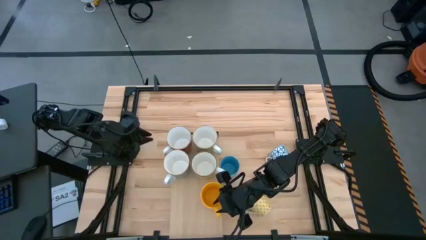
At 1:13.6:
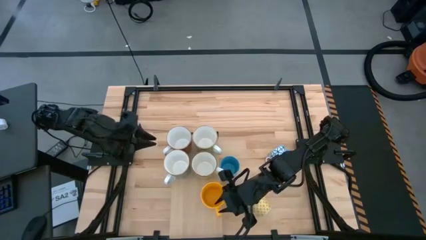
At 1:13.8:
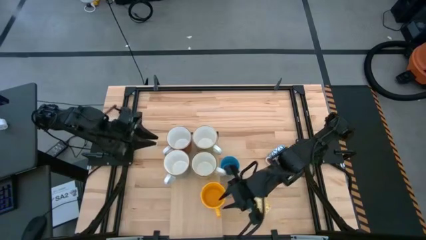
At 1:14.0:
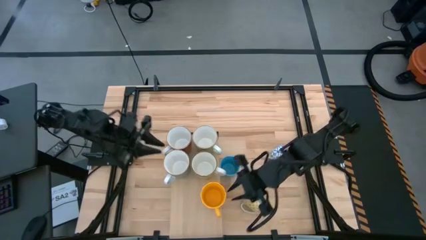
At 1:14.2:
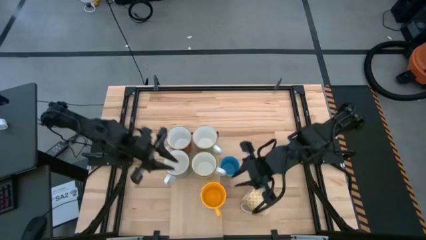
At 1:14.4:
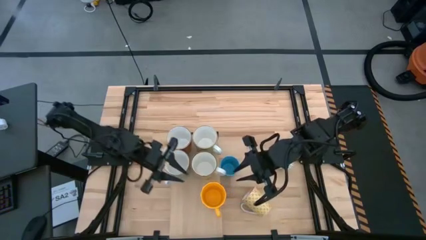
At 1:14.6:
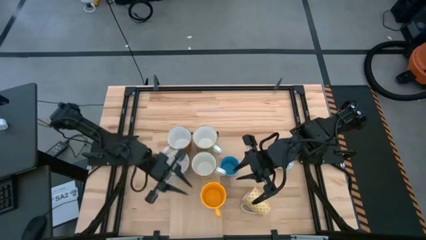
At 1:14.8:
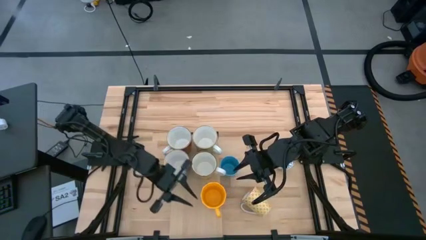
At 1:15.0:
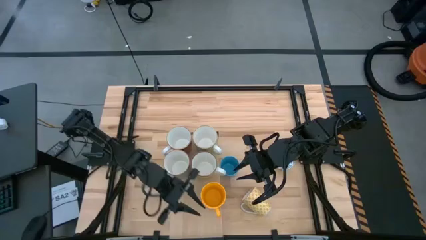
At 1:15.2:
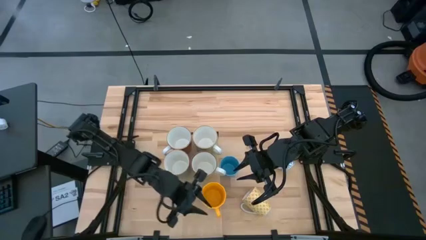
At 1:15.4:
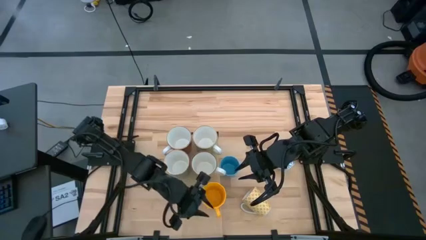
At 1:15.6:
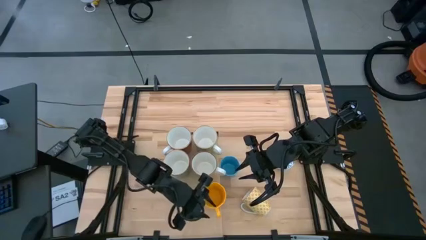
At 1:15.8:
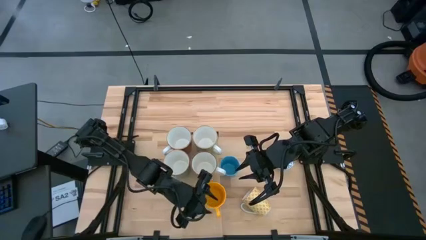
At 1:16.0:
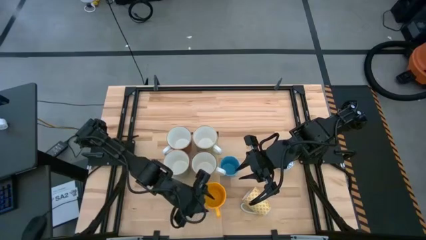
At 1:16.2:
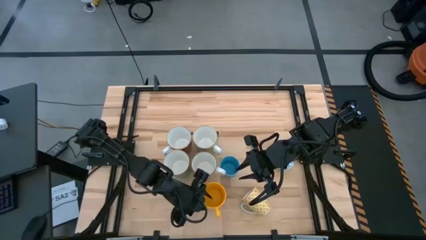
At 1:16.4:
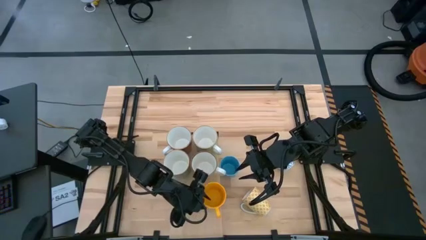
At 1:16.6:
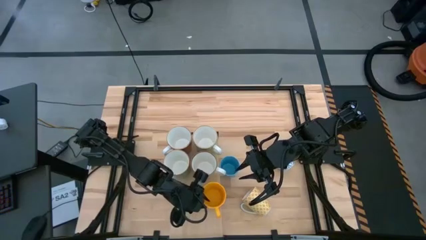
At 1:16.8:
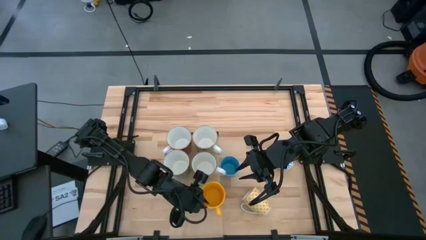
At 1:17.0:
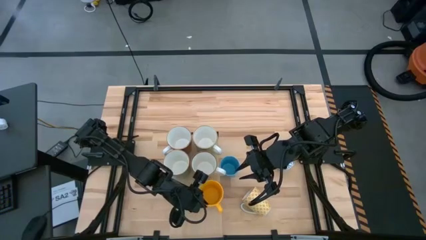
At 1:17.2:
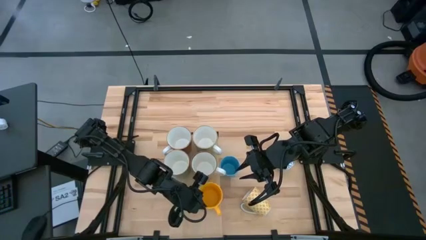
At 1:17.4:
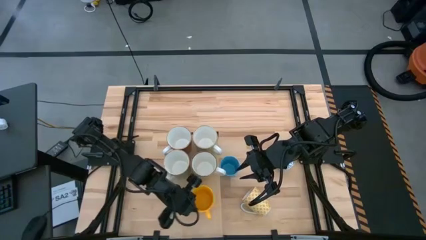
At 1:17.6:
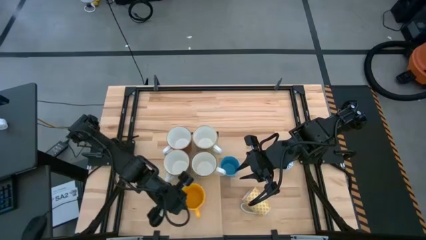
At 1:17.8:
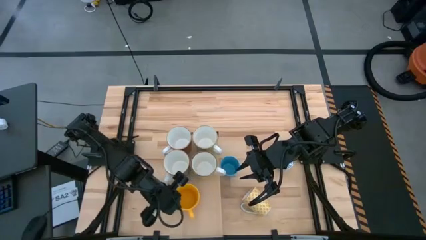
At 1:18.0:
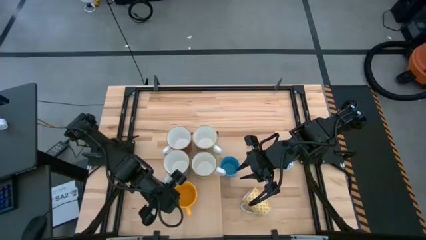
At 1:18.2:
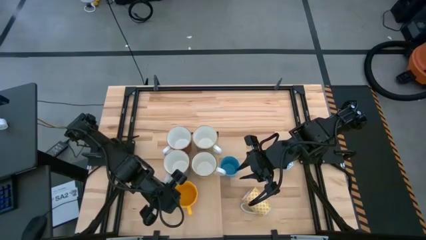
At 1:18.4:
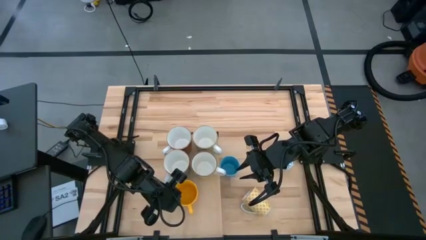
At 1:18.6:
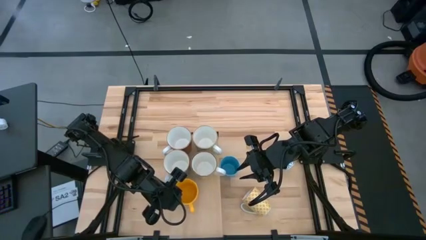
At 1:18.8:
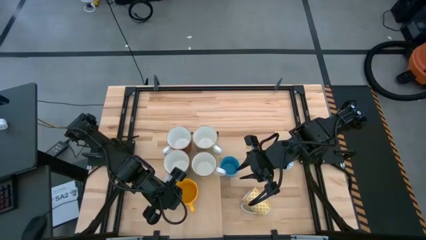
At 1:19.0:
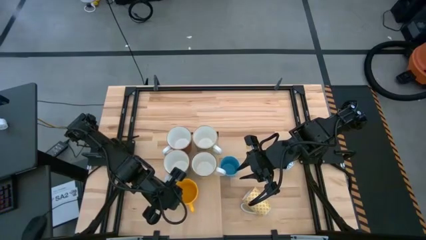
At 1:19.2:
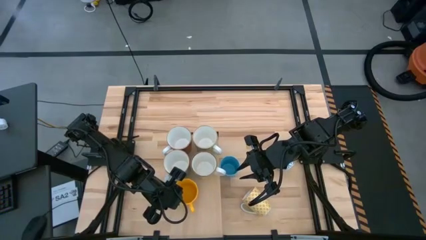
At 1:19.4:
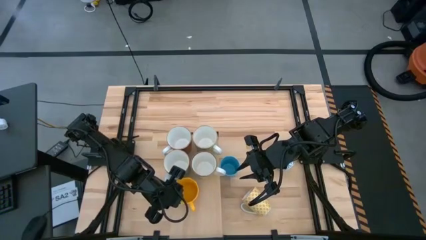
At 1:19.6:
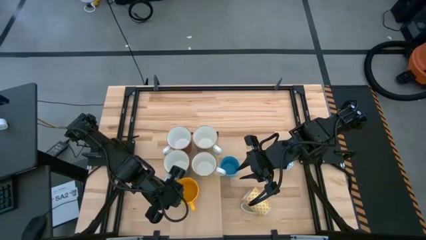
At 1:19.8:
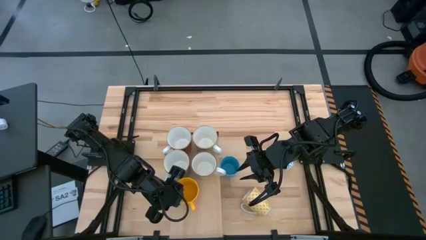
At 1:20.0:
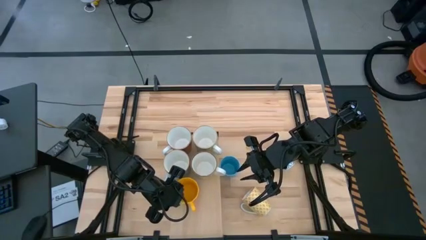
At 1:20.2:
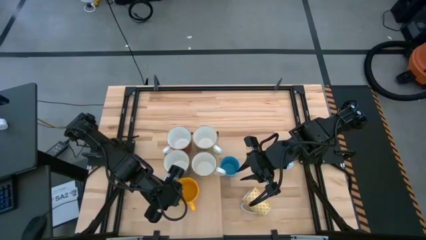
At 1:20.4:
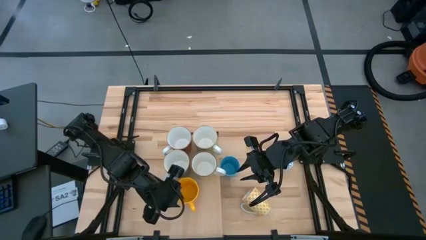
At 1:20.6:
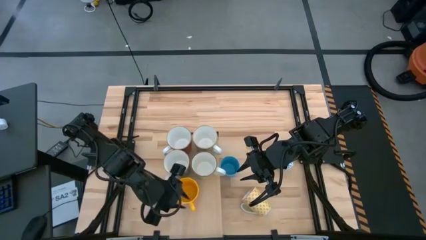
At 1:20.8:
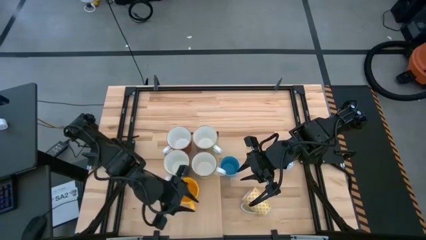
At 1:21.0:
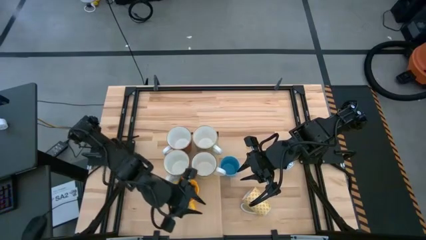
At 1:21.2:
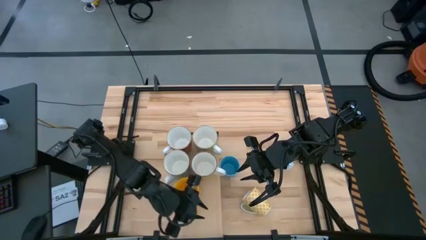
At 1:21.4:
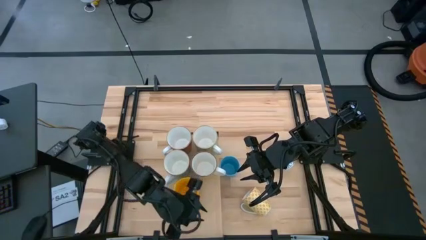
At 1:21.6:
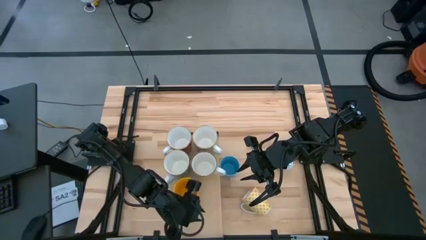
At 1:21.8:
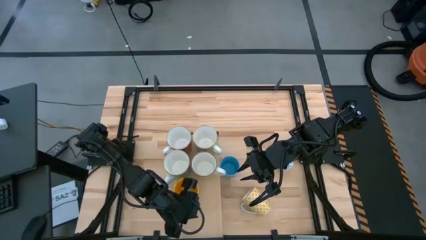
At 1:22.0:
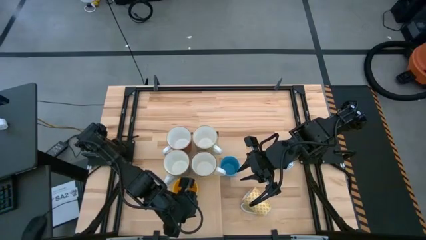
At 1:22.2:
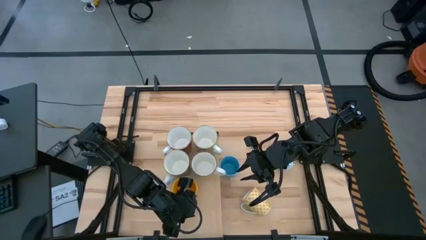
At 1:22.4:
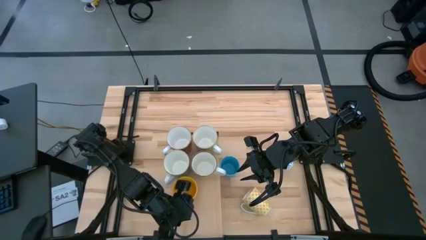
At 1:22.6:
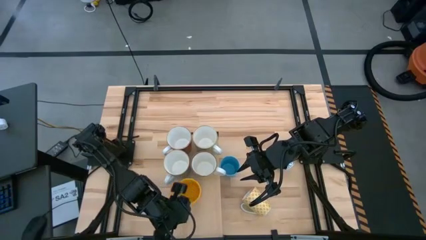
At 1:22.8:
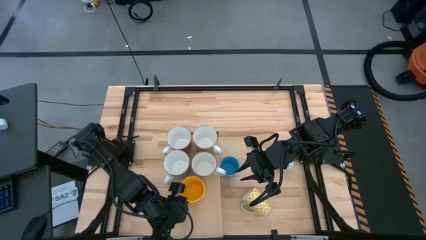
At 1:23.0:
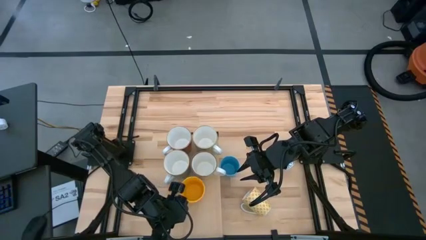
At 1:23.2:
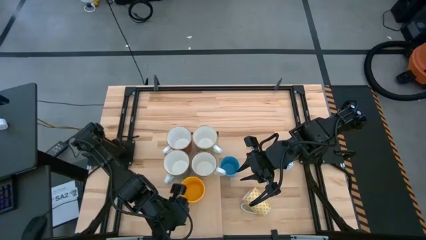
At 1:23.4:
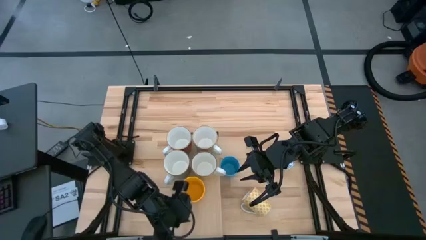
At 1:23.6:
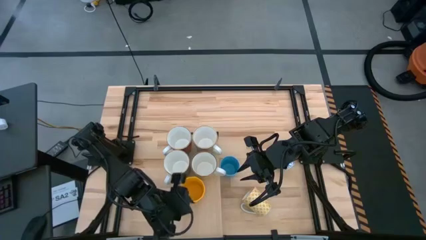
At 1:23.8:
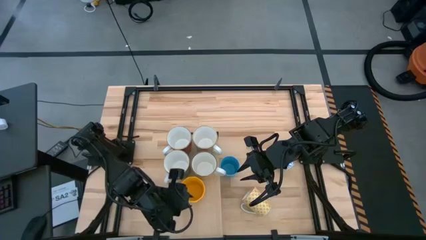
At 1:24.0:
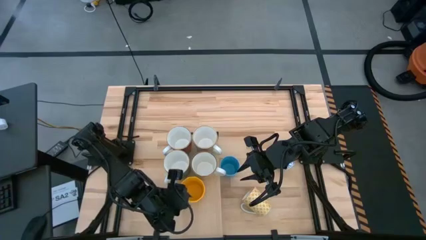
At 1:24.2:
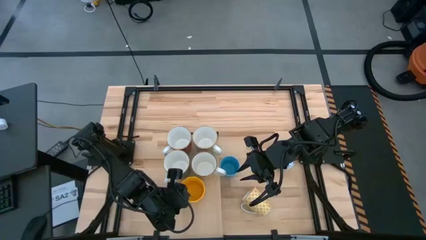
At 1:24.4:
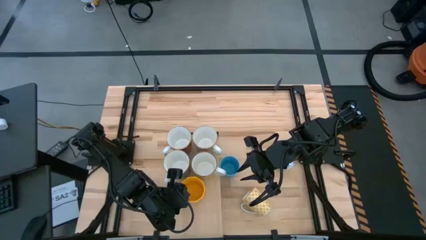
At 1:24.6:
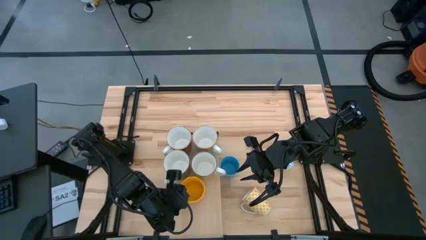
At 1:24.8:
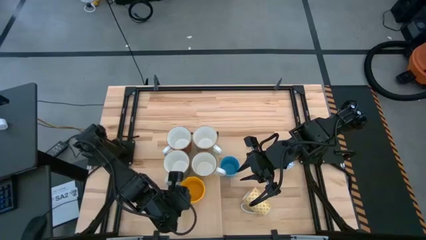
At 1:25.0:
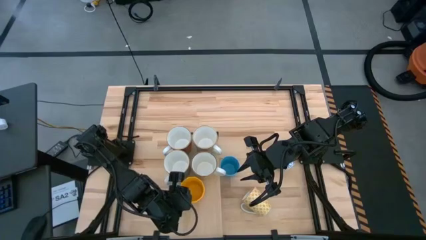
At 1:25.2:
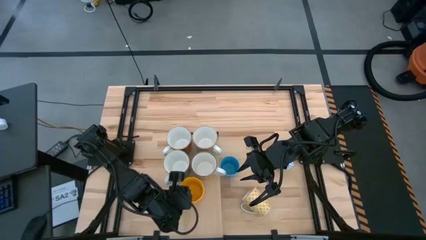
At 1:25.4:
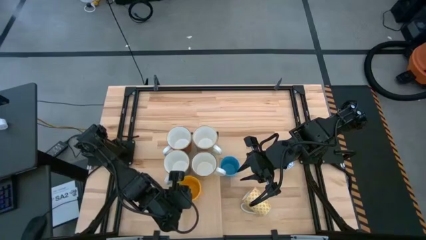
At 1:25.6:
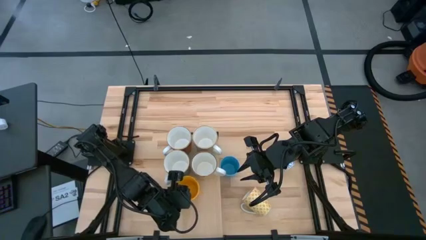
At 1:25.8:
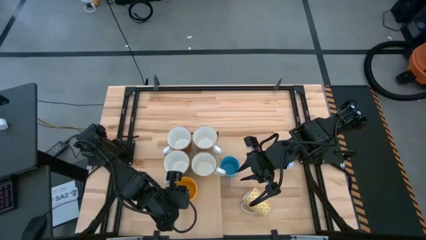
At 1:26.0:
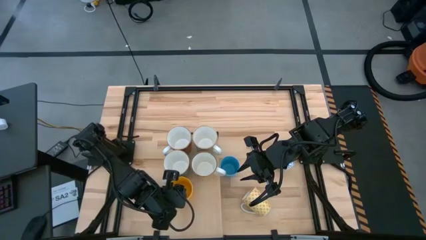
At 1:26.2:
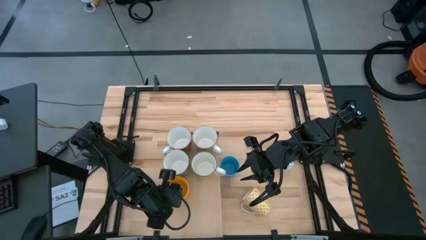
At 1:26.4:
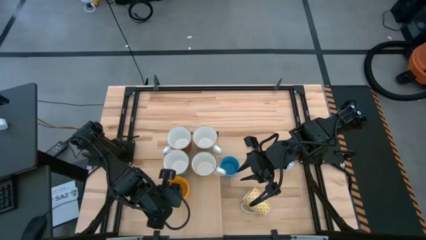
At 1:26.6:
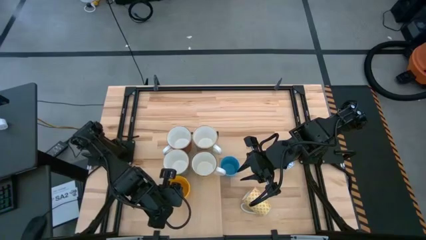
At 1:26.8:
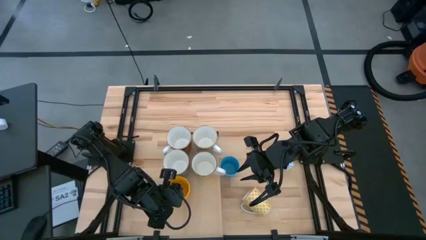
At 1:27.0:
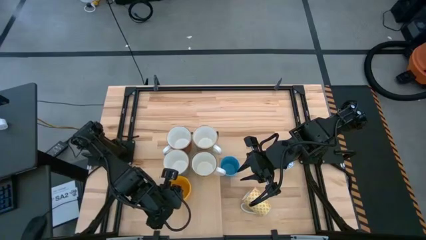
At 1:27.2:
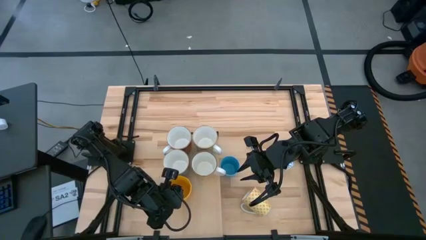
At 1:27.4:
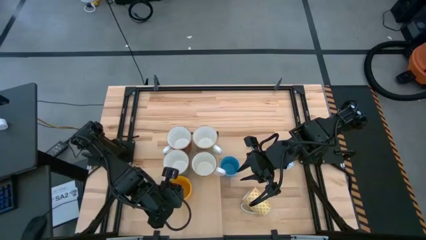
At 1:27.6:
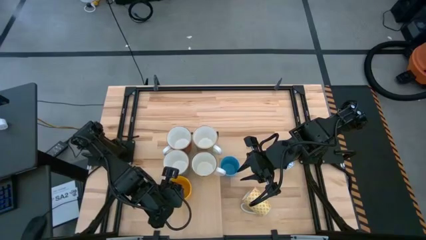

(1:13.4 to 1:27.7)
Task: Place coffee mugs
Put the top yellow mug on the shelf aligned with the blue mug

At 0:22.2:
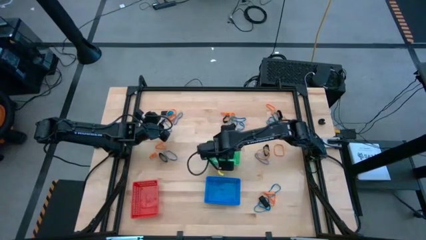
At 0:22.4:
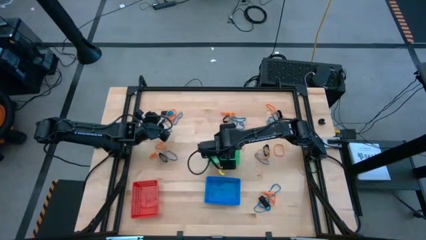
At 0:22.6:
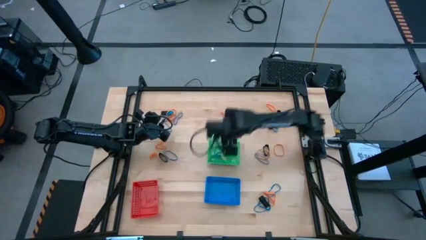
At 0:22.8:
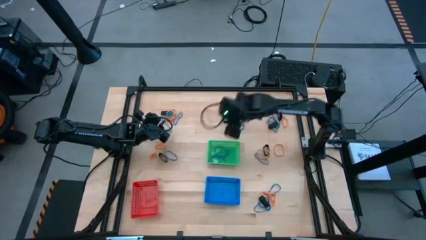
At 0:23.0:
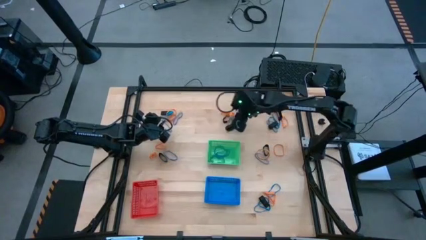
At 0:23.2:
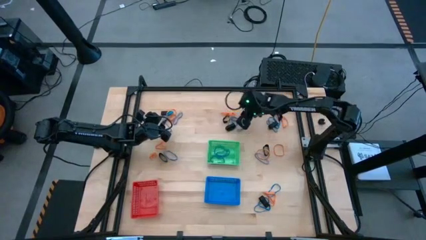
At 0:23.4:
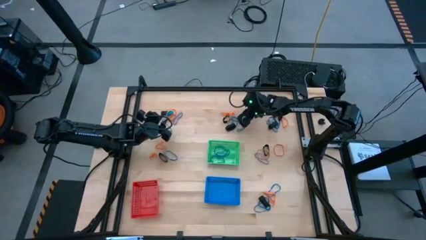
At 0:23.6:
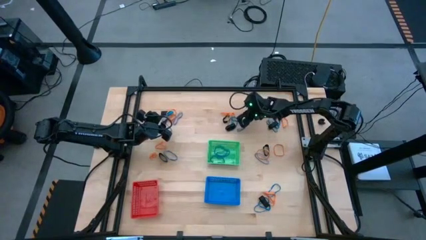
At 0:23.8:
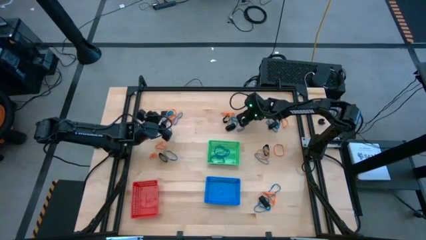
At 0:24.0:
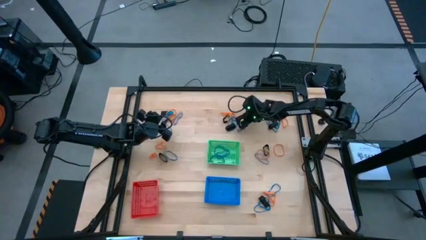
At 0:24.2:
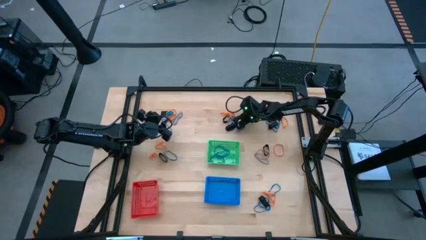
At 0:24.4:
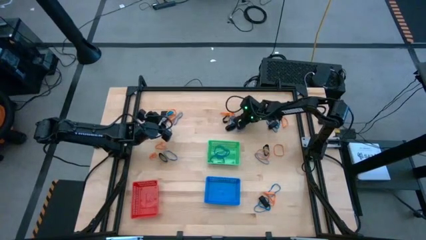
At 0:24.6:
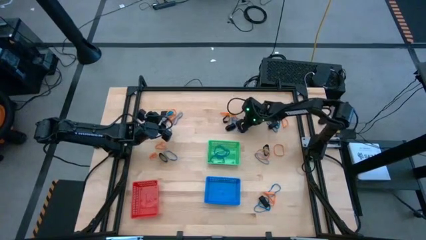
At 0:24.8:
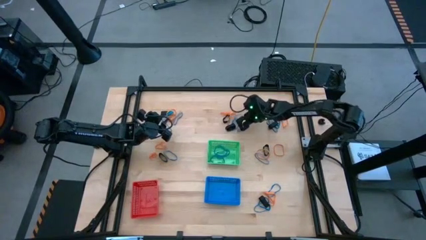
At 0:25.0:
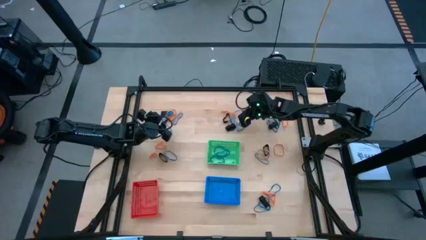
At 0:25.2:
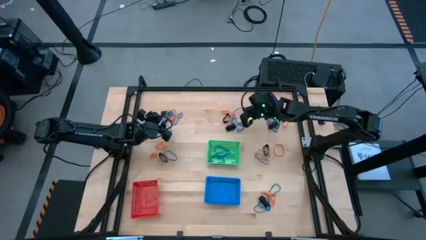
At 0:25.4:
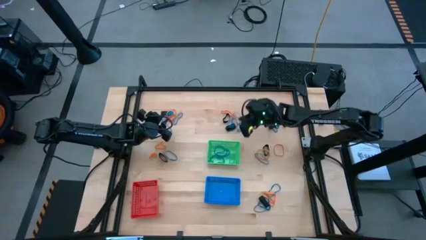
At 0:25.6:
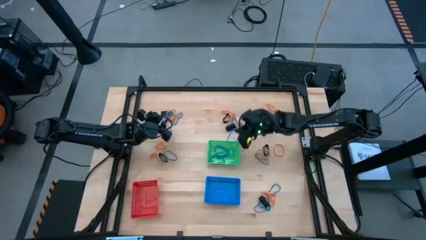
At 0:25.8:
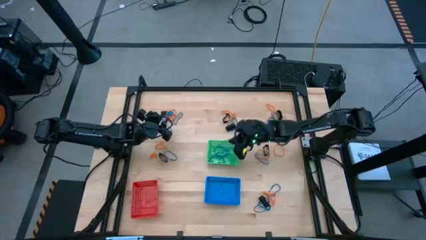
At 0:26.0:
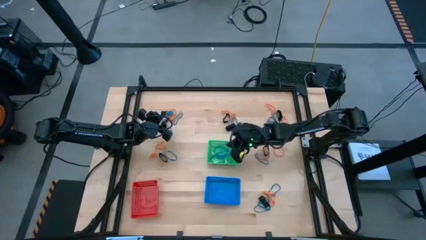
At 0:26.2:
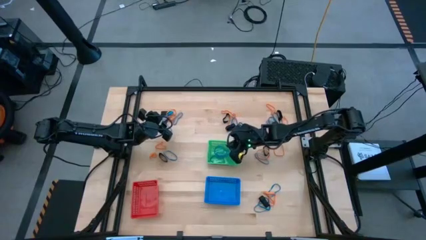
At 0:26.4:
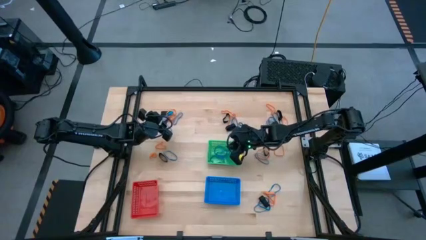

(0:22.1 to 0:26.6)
Task: Sort rubber bands into baskets
Put the blue rubberband into the green bin
